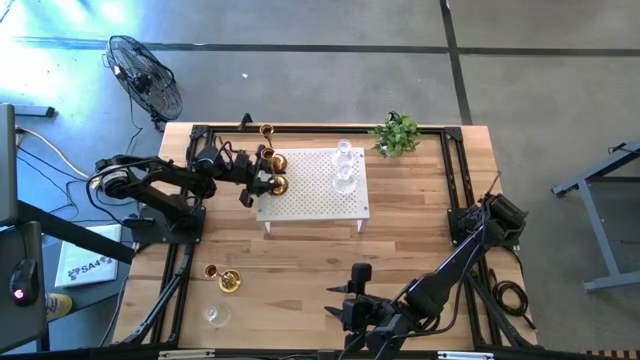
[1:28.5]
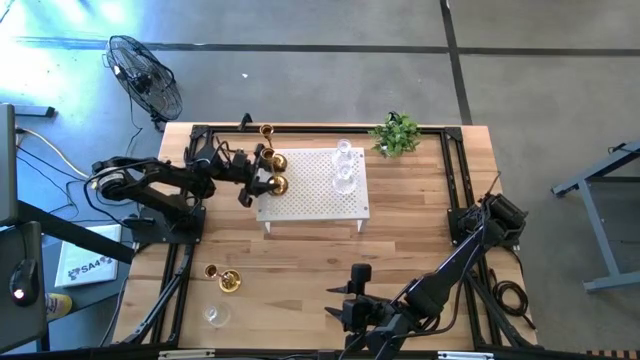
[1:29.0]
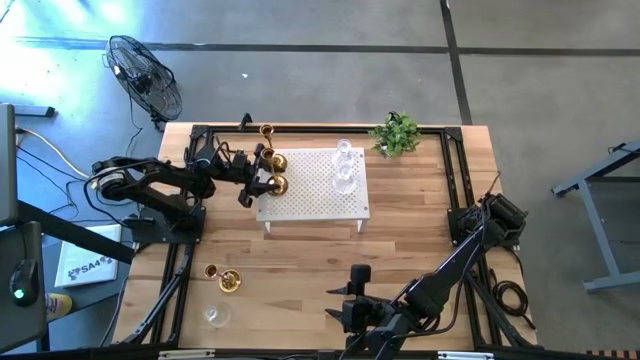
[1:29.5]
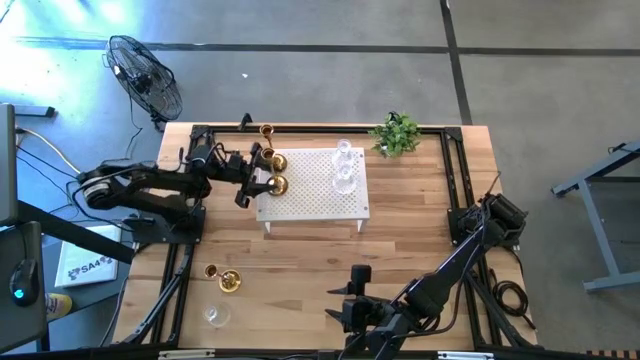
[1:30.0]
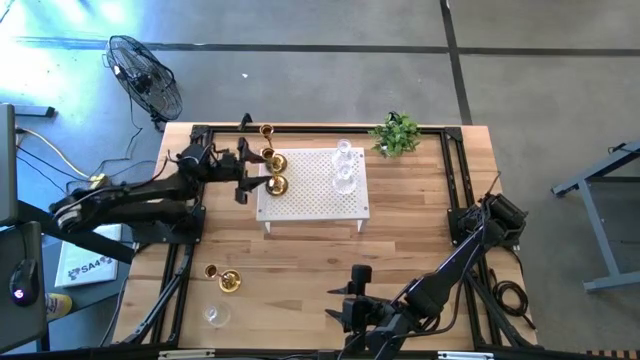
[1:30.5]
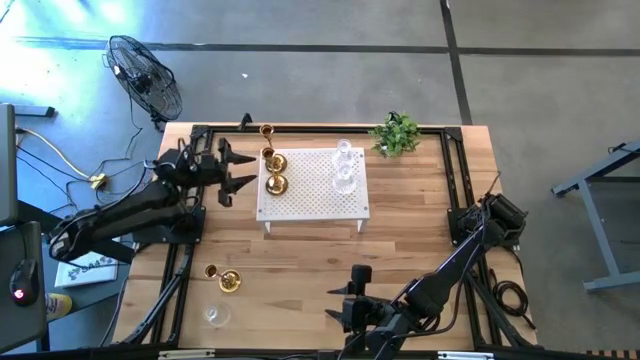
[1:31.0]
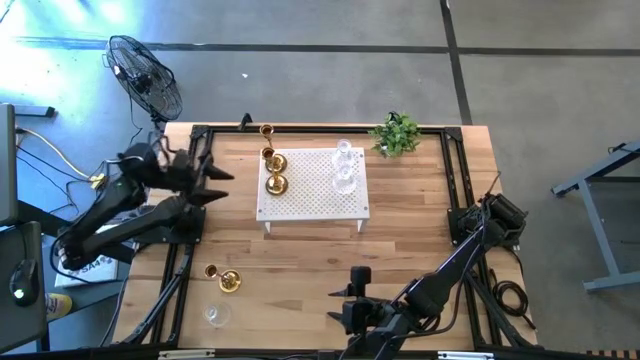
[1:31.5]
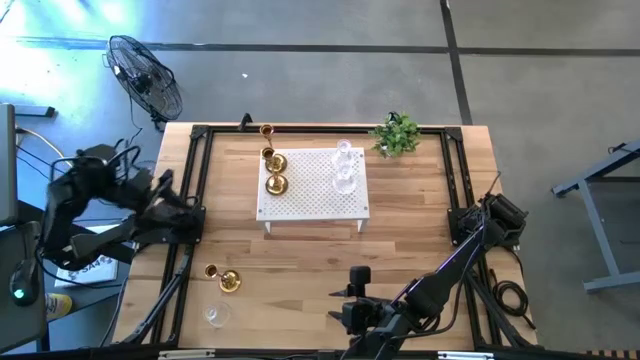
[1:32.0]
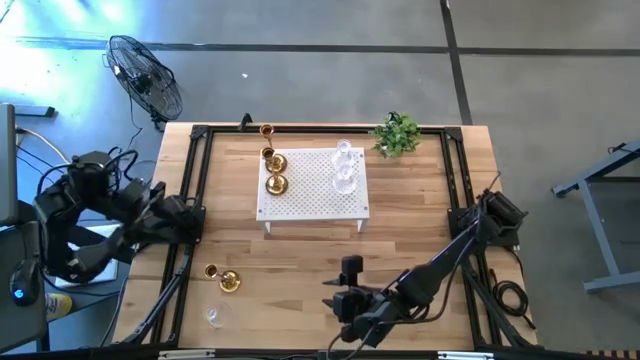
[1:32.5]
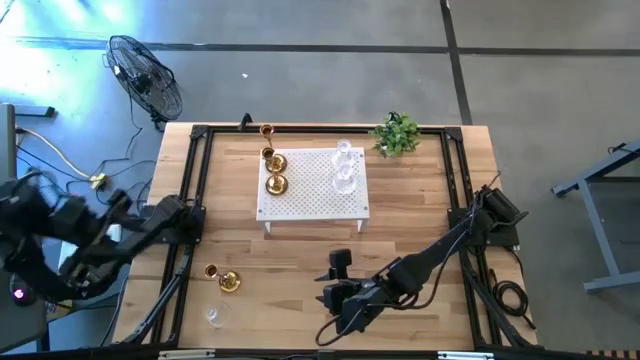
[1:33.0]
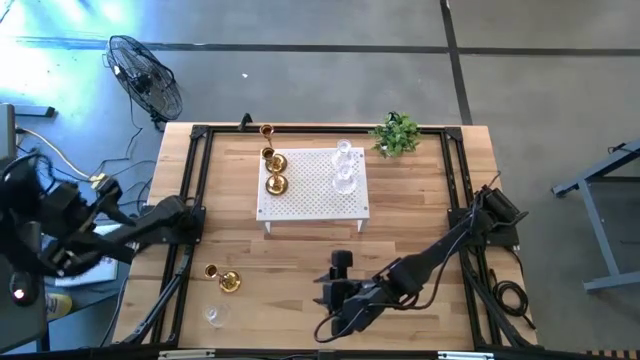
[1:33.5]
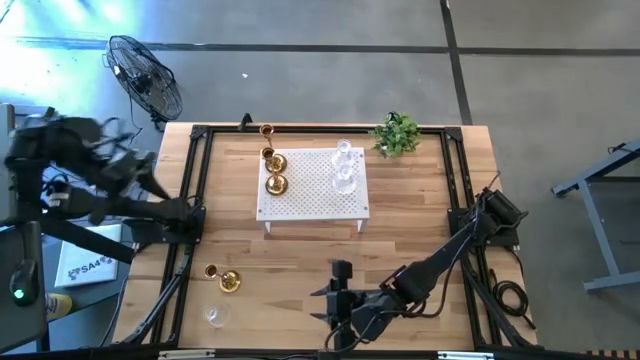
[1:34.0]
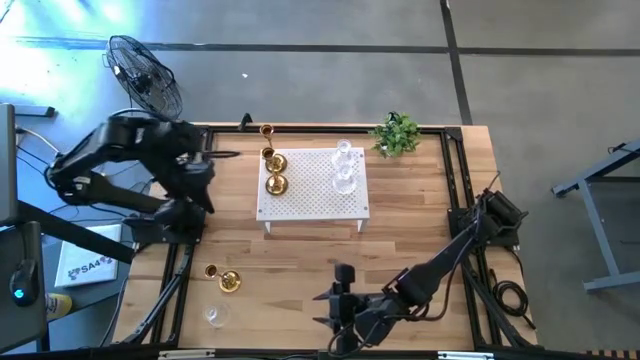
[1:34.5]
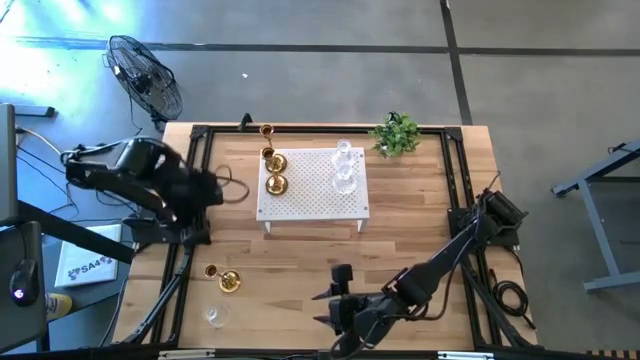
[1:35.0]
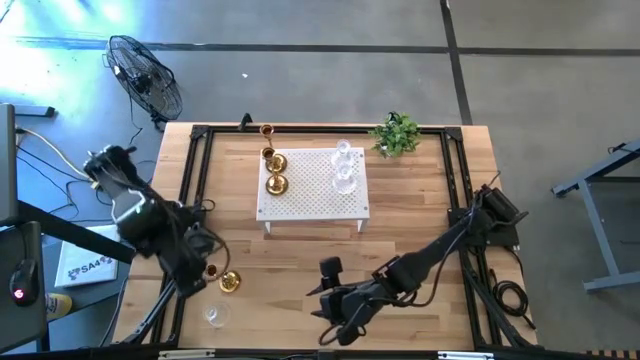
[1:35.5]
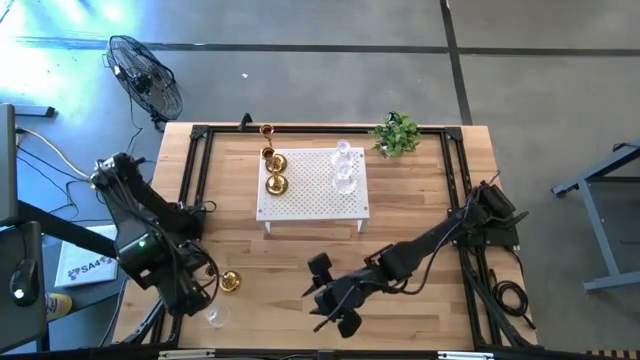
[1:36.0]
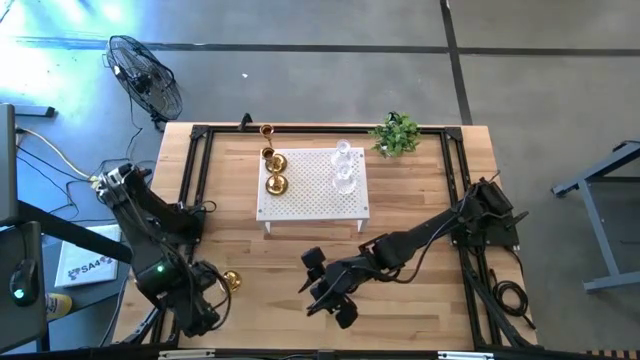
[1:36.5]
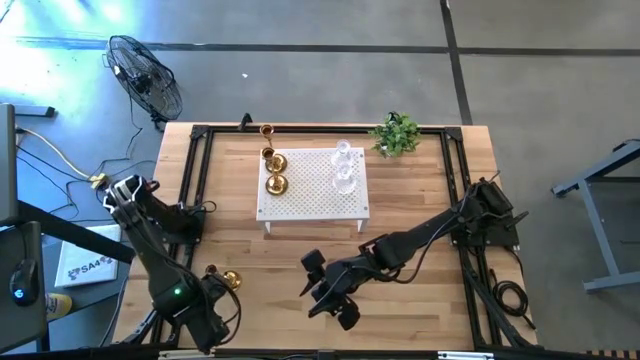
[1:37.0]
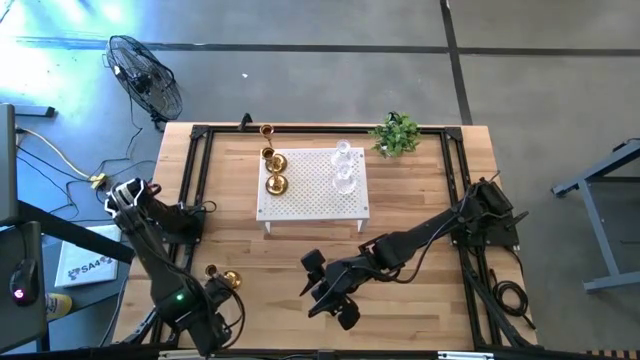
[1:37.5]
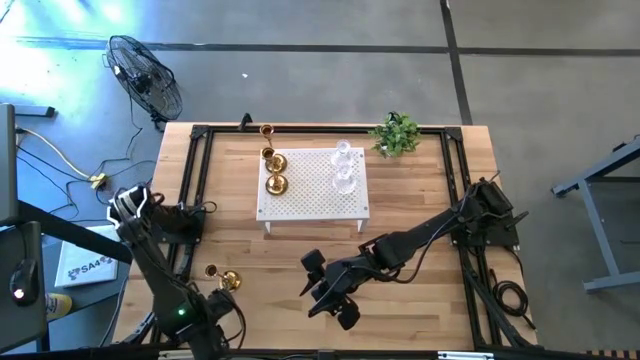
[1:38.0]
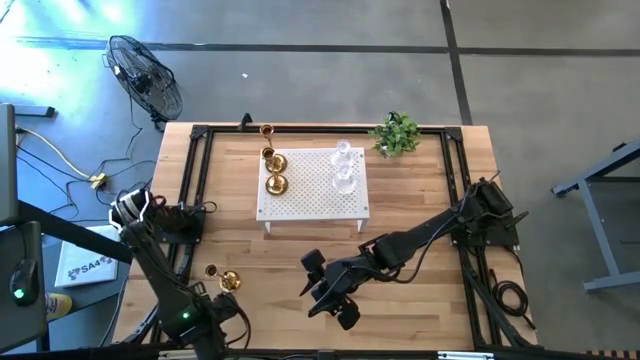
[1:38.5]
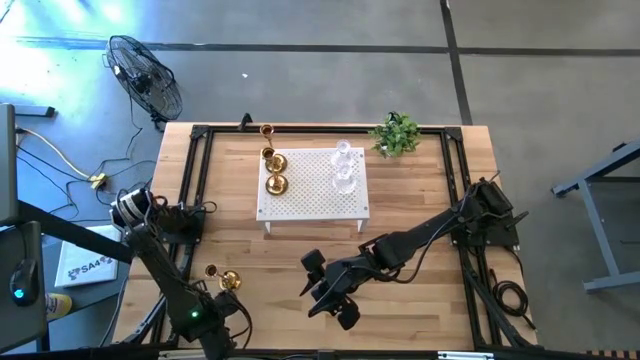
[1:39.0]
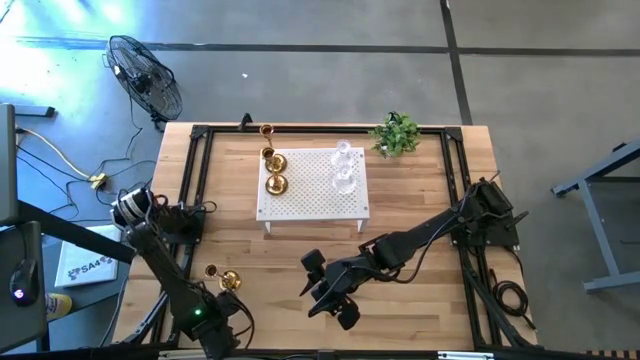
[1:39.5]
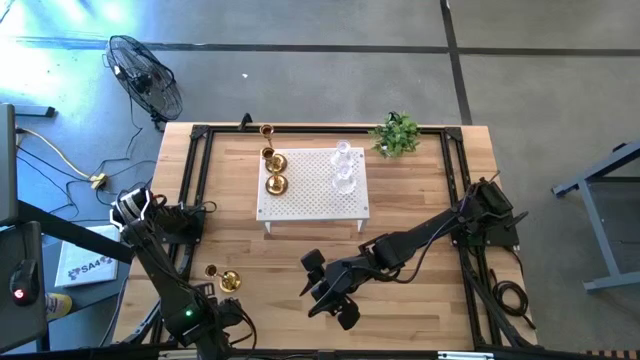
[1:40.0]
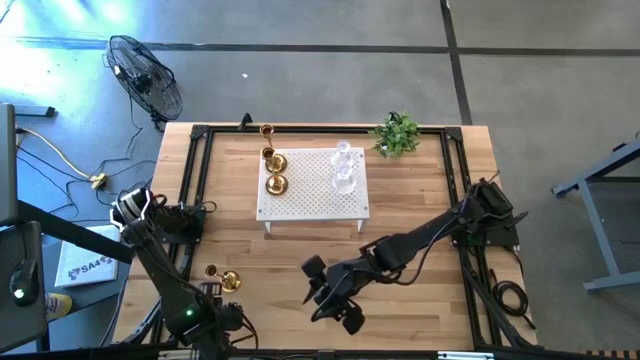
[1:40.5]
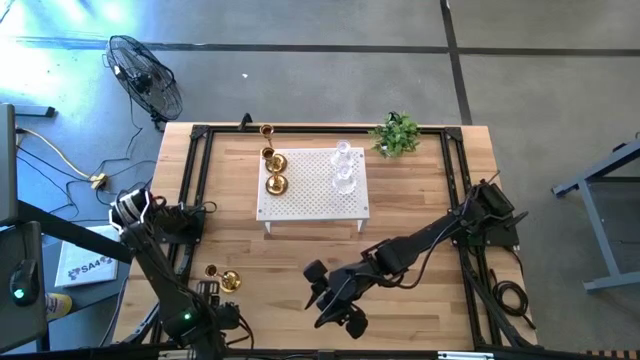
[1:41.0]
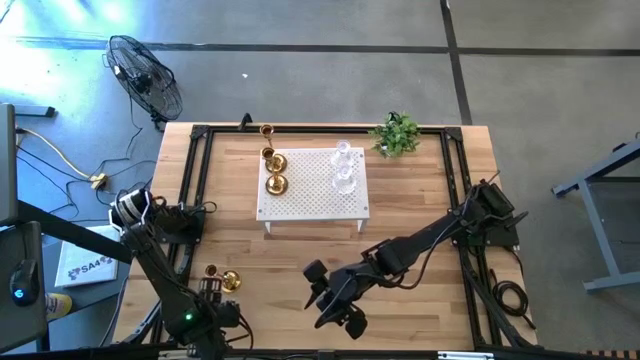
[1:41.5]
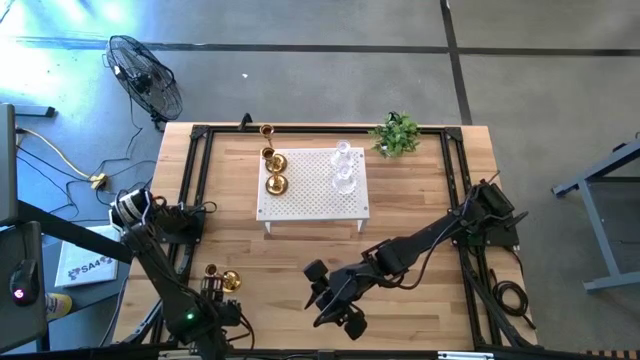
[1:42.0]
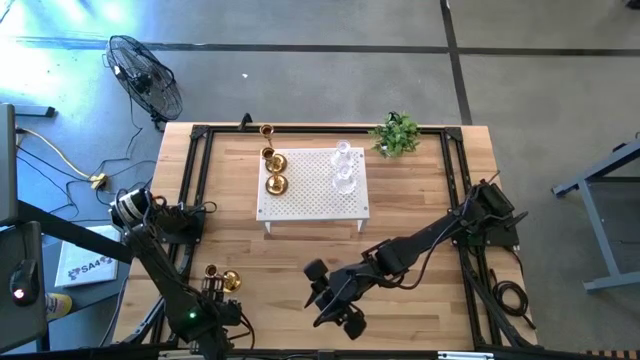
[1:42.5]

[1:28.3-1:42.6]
Task: Pick & Place candle stick holders
Put the transparent glass candle holder on the shelf aligned with the other transparent glass candle holders
